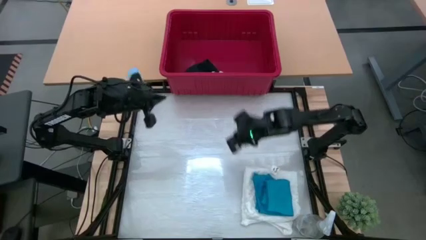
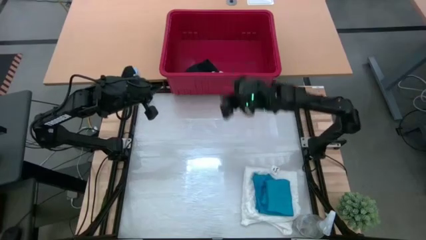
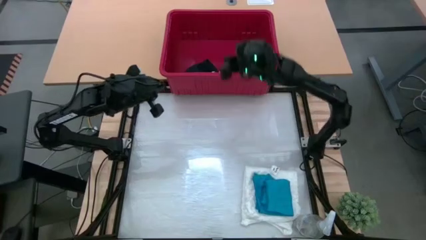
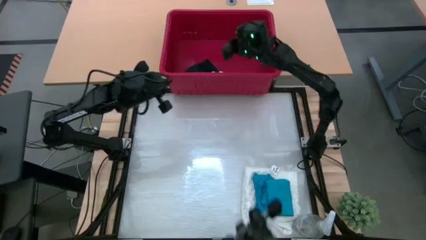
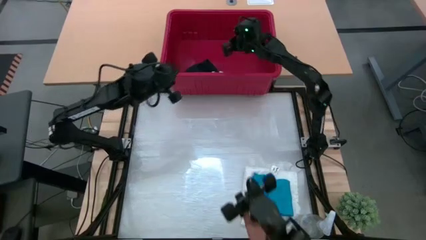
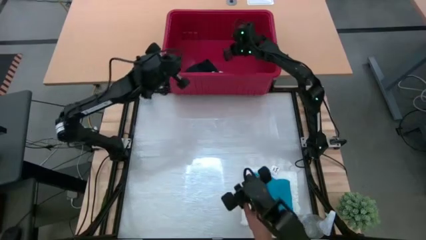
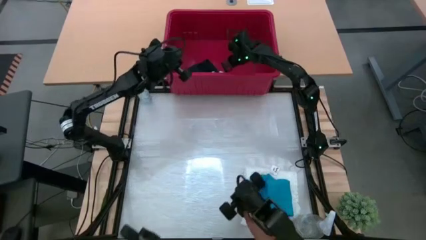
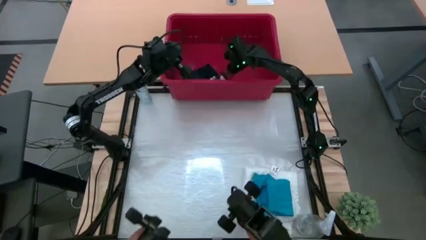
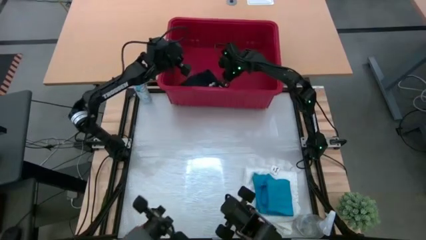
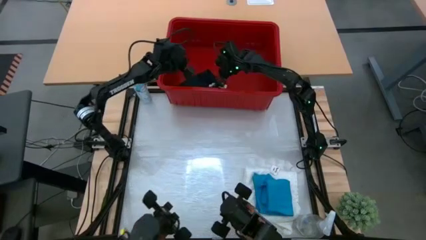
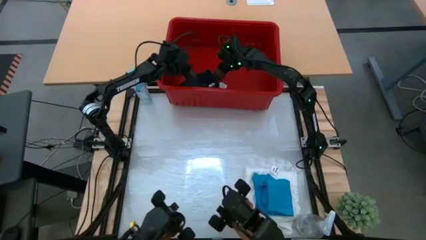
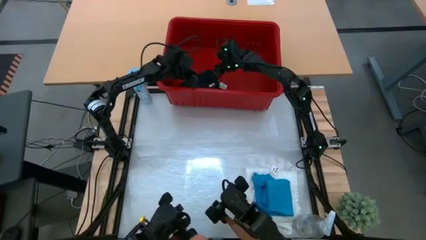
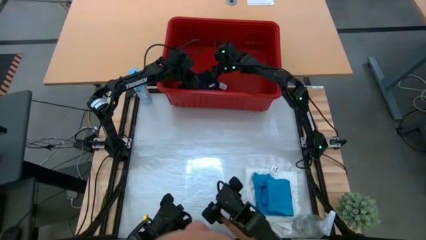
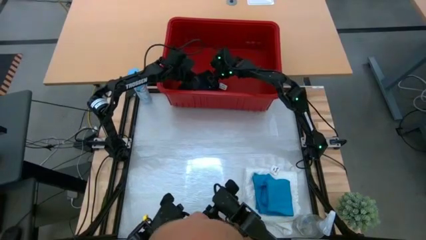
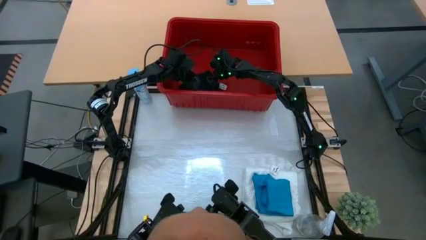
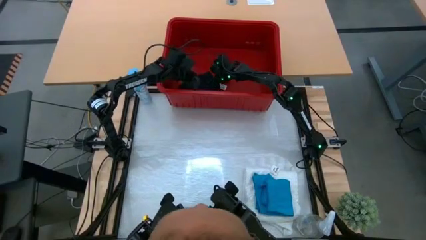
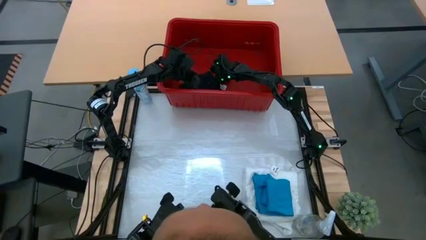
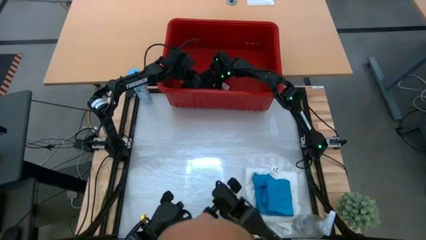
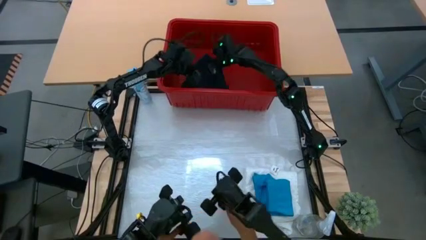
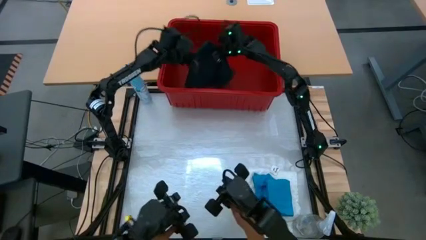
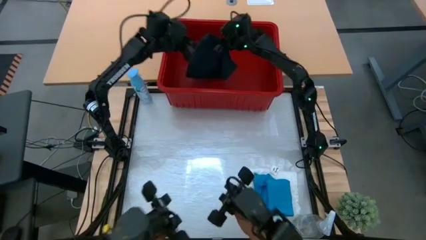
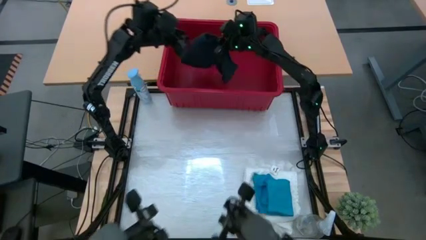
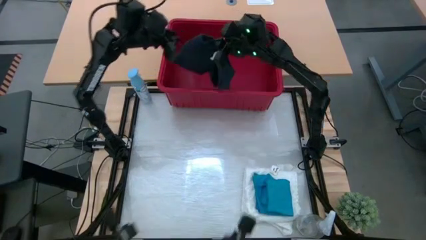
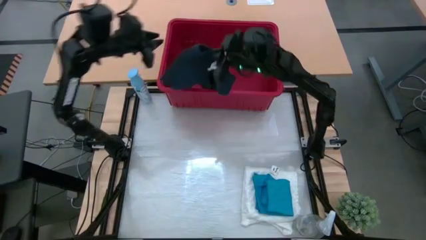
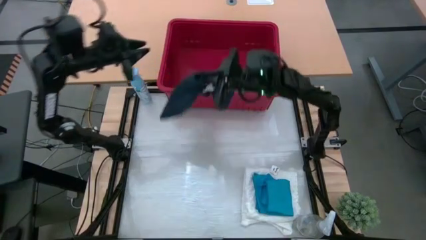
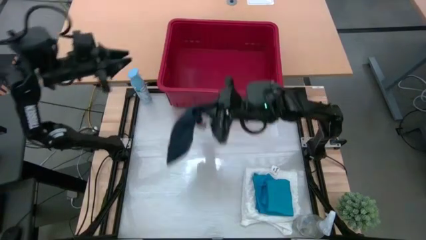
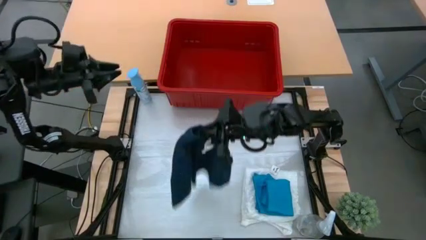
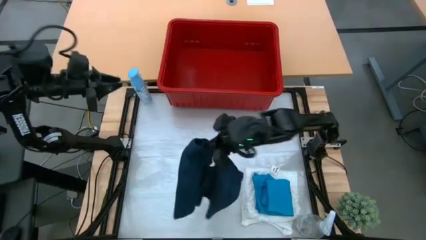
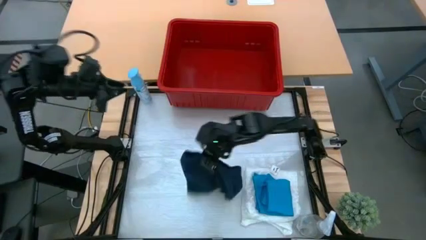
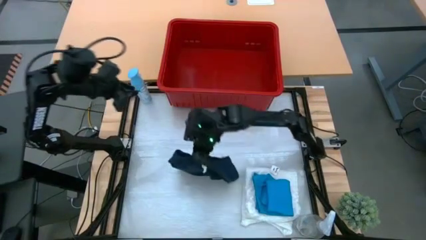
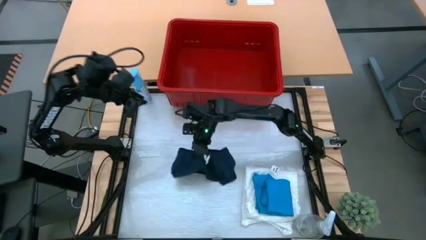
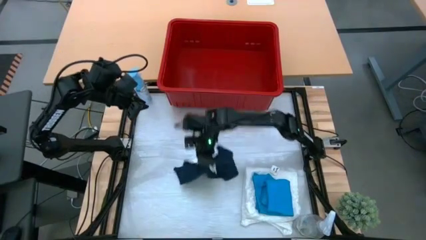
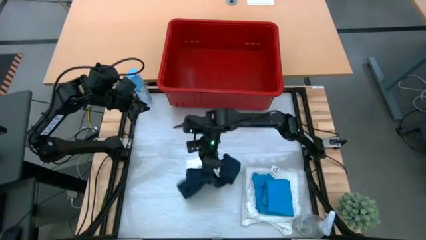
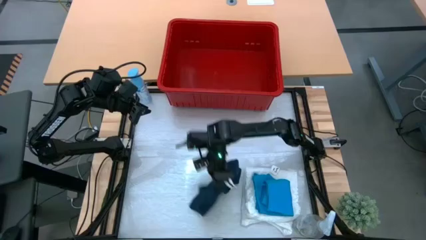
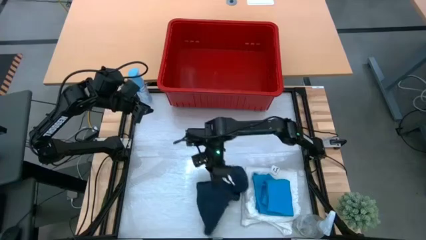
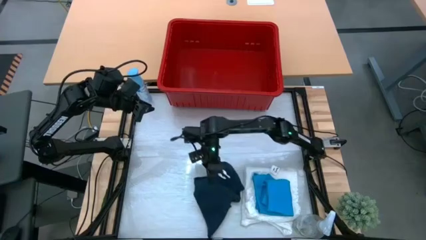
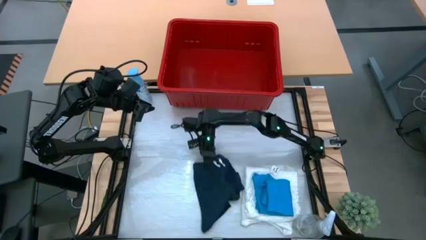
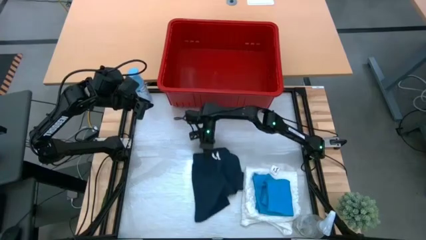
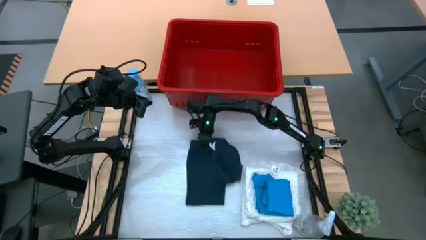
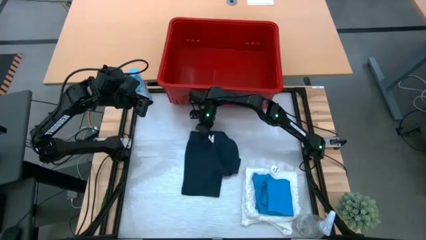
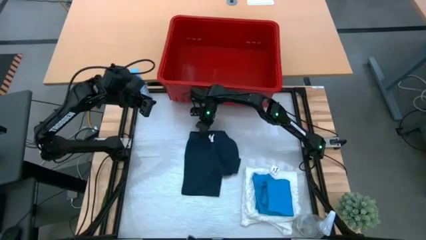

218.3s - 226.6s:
Task: Fold laundry
Remove the dark blue shorts from the red laundry bin

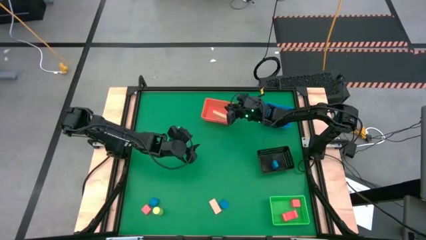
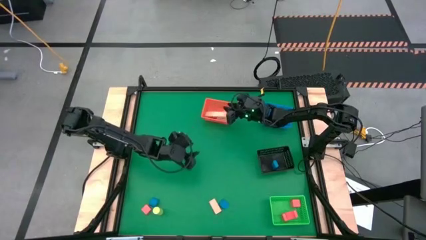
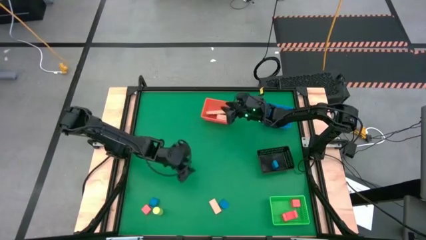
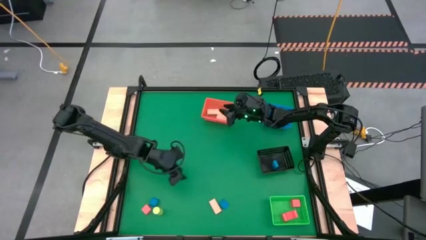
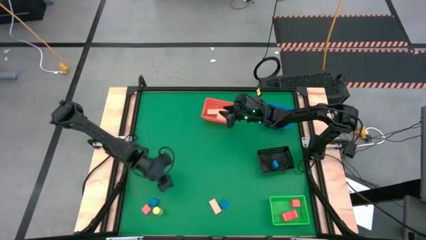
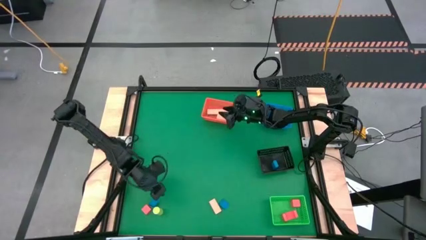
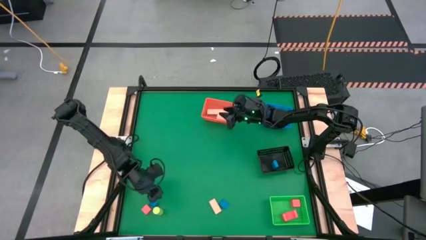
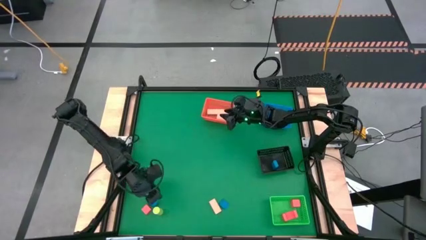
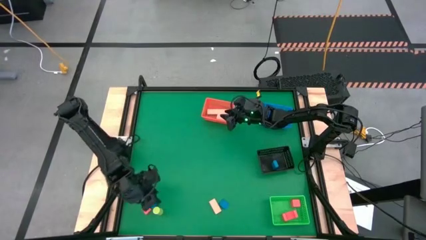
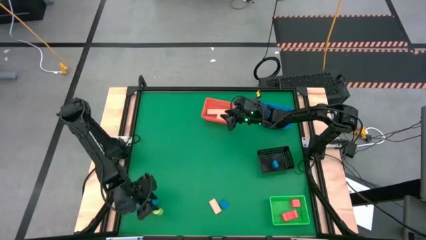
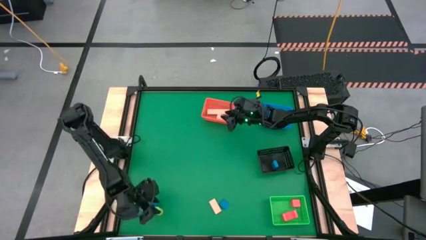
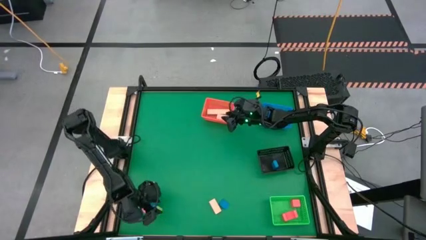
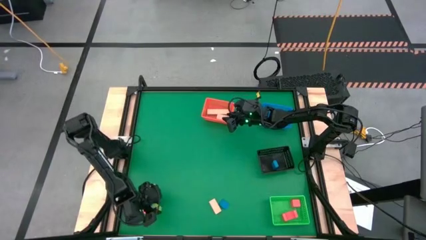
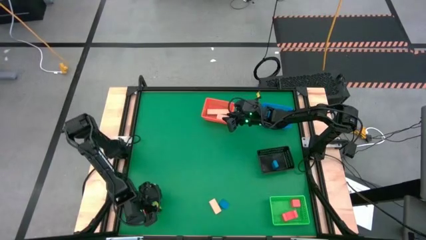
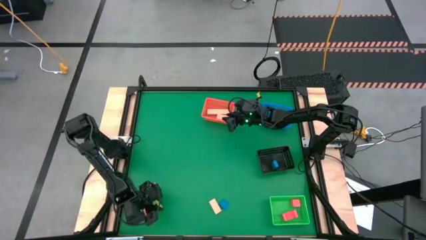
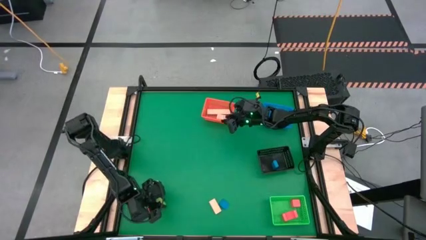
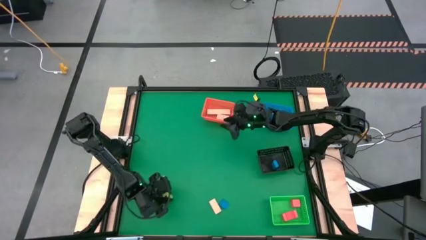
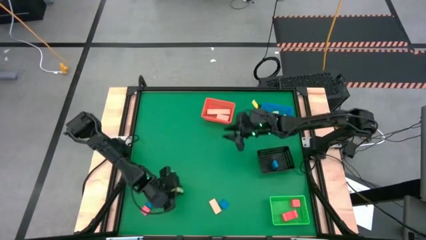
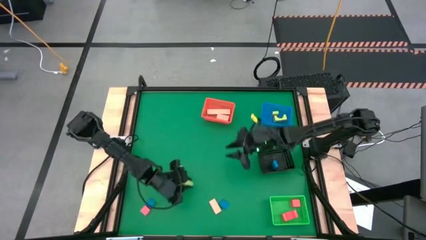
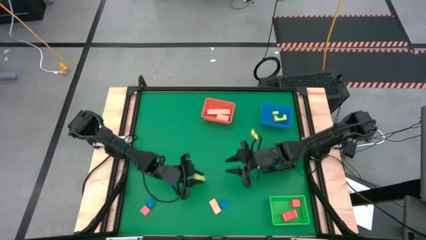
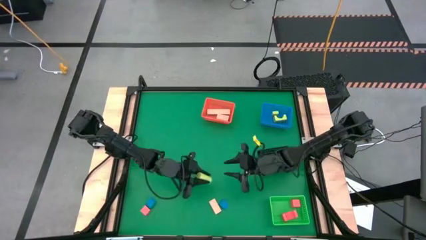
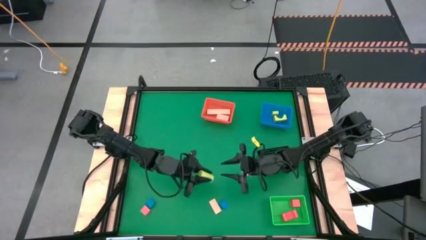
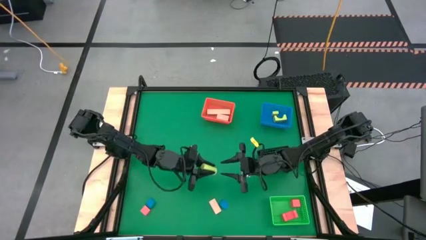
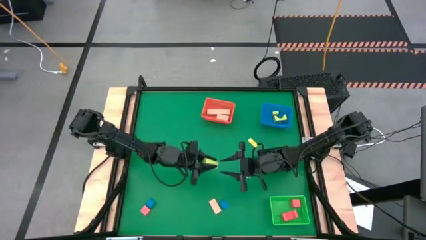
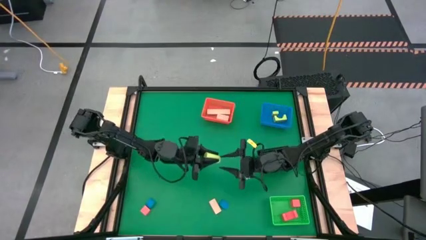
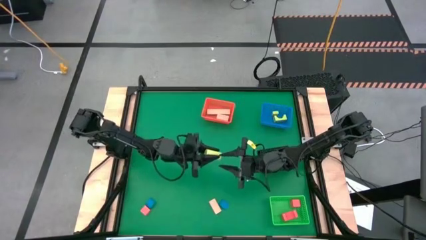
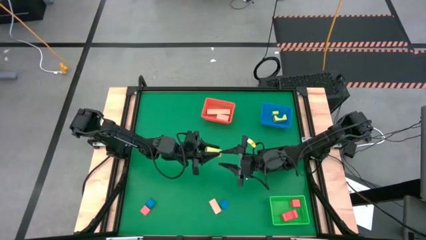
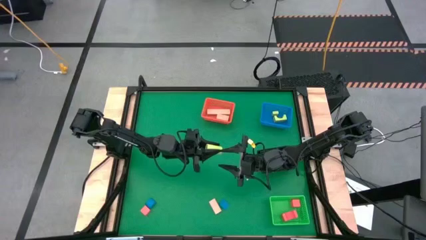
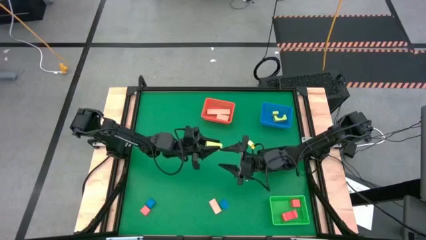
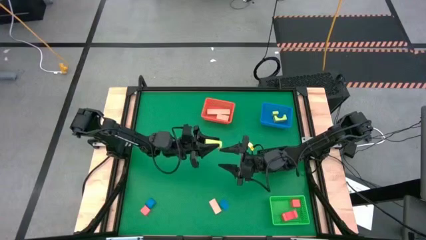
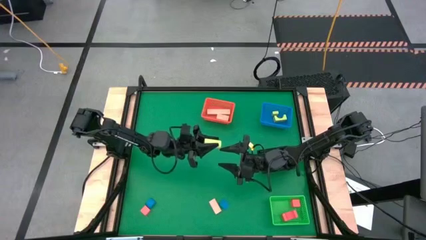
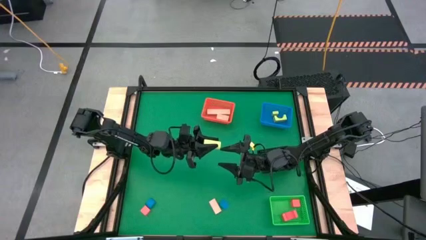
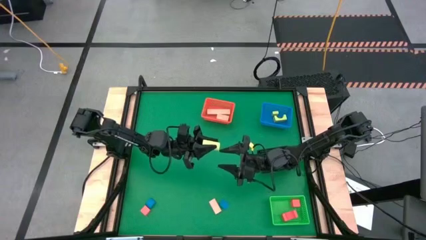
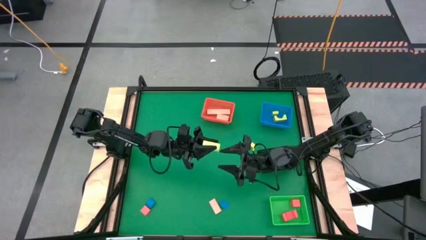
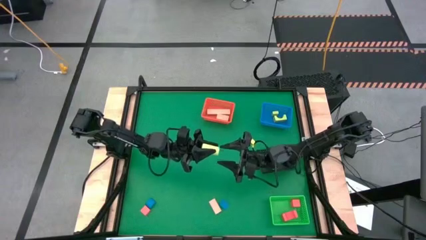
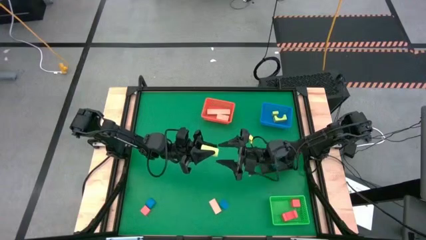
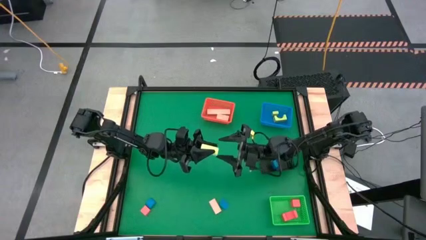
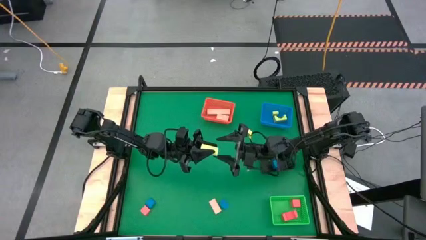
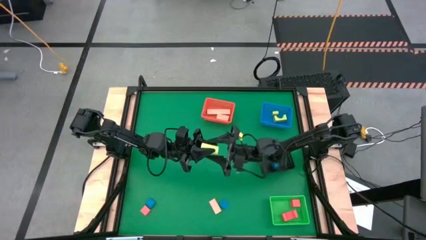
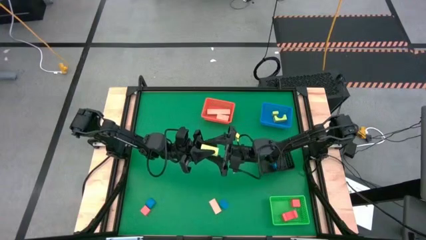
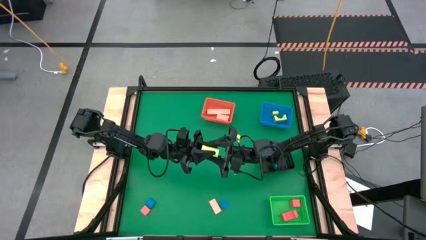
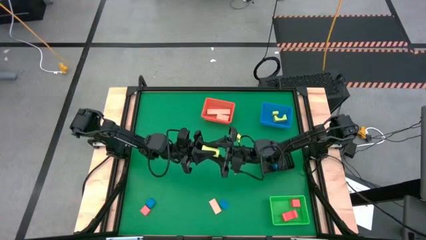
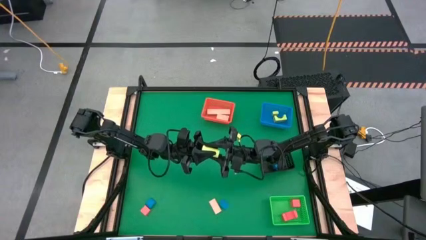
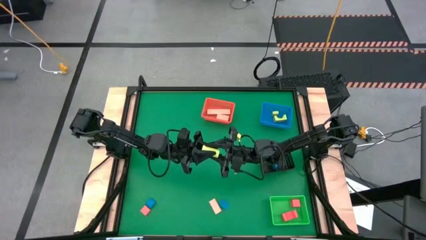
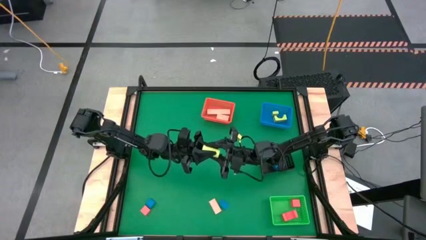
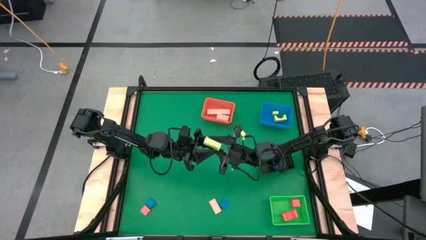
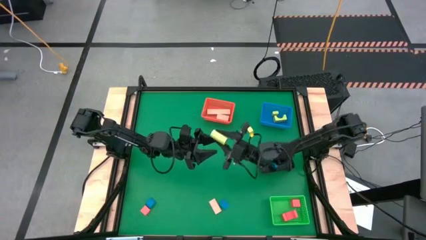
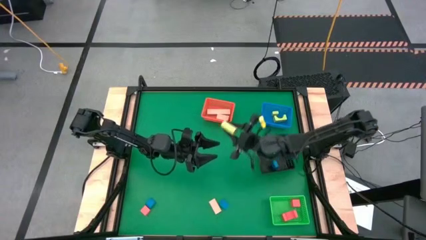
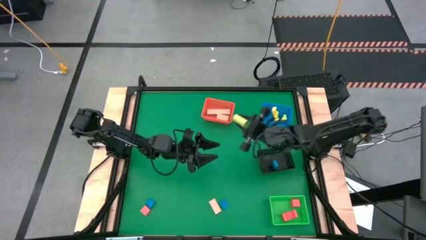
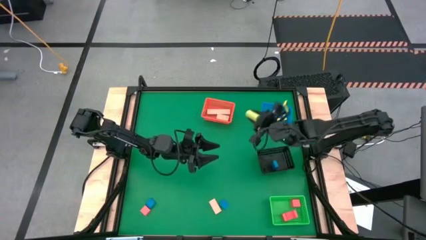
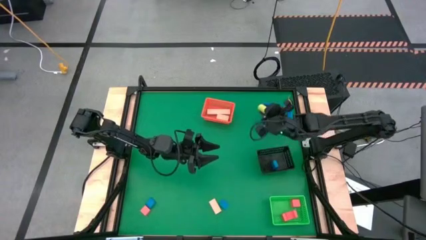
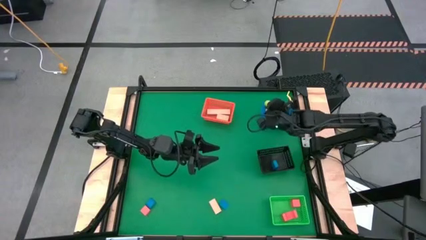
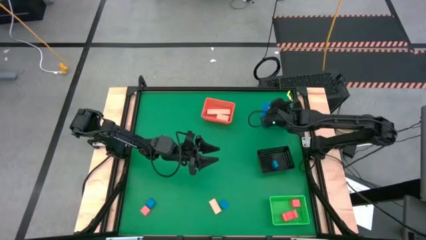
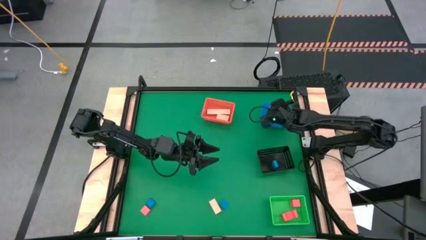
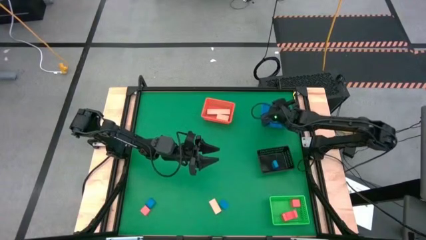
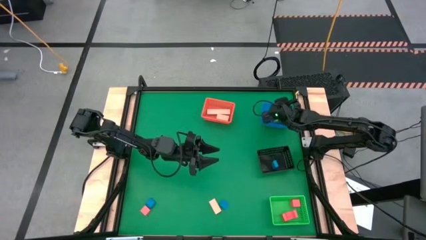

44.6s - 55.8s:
Task: Sort & place blocks by color
Put the green block into the blue bin
